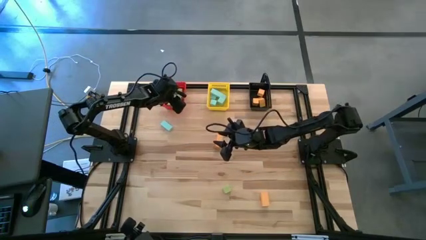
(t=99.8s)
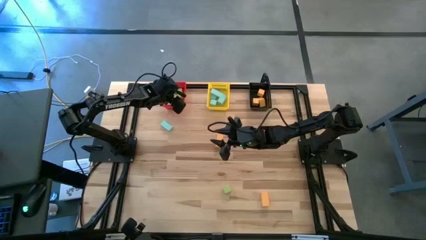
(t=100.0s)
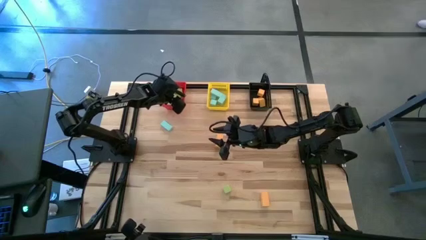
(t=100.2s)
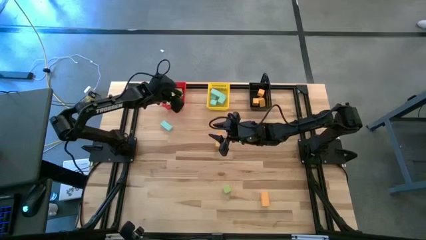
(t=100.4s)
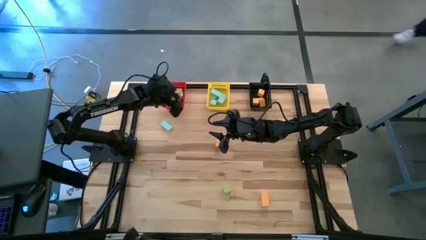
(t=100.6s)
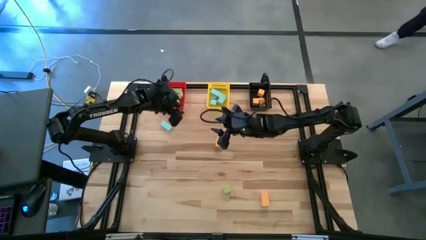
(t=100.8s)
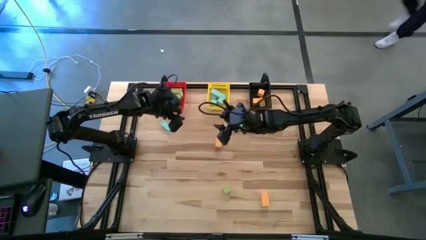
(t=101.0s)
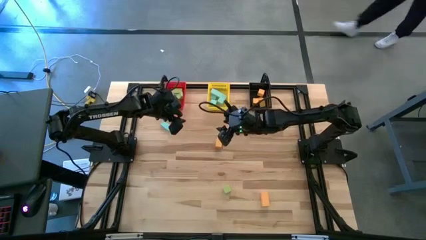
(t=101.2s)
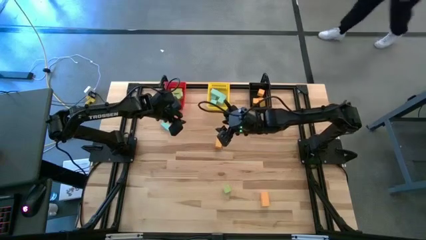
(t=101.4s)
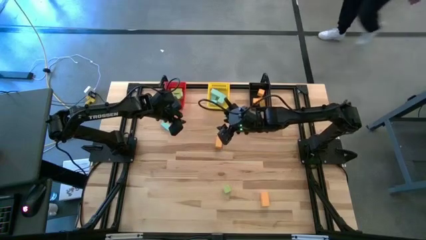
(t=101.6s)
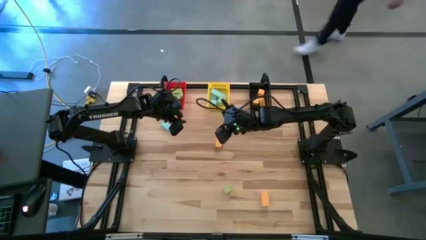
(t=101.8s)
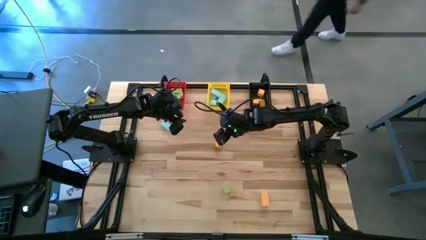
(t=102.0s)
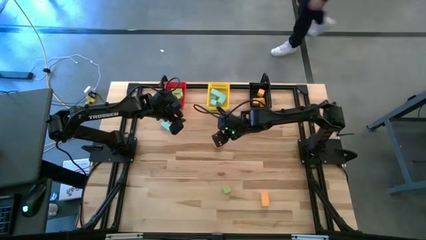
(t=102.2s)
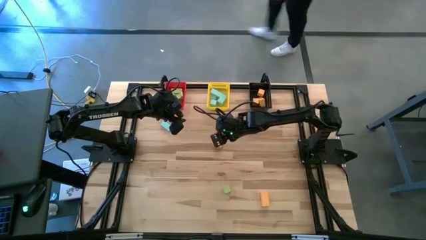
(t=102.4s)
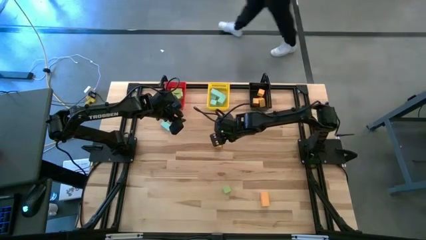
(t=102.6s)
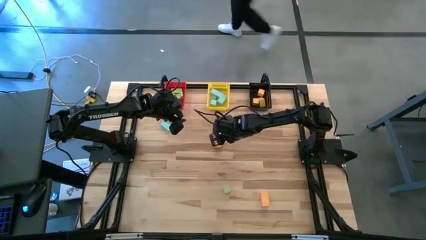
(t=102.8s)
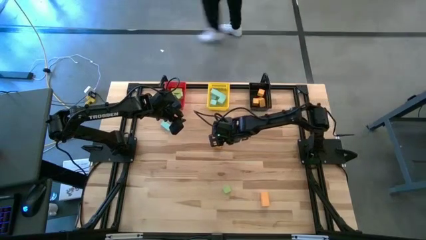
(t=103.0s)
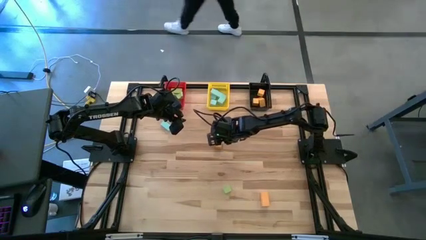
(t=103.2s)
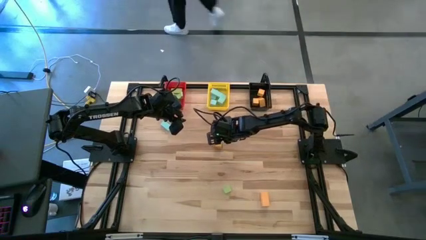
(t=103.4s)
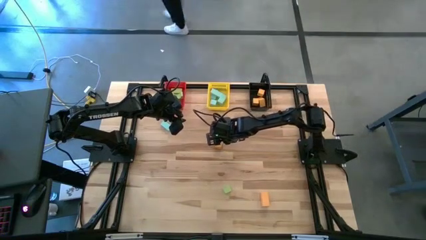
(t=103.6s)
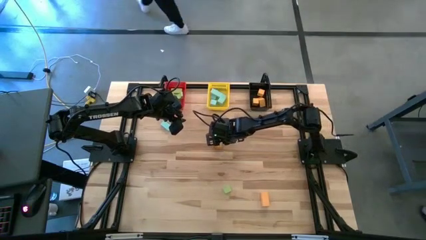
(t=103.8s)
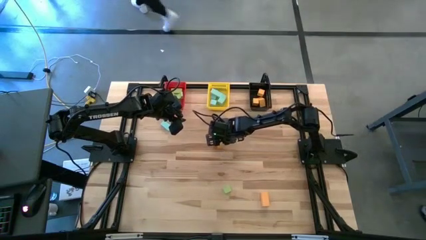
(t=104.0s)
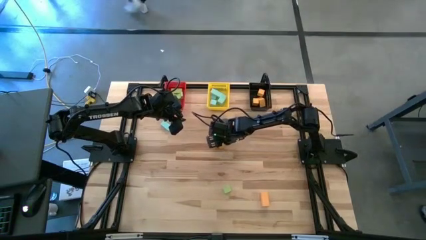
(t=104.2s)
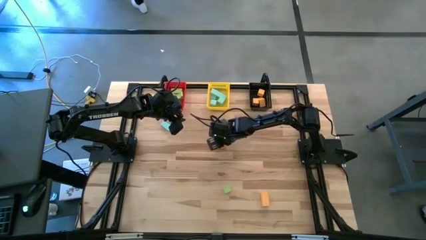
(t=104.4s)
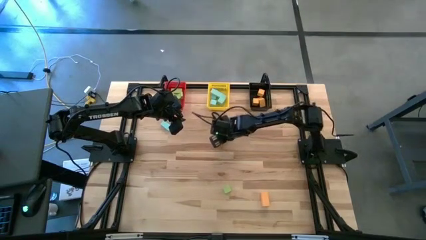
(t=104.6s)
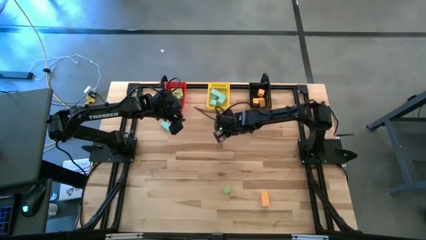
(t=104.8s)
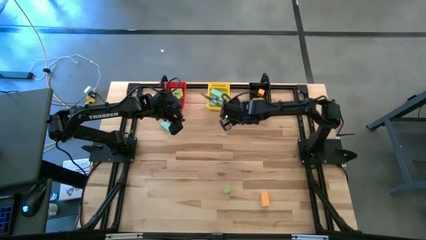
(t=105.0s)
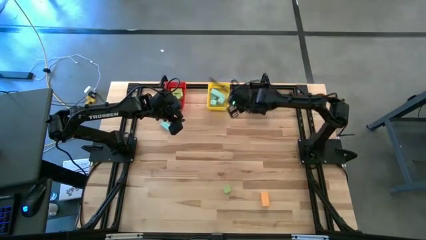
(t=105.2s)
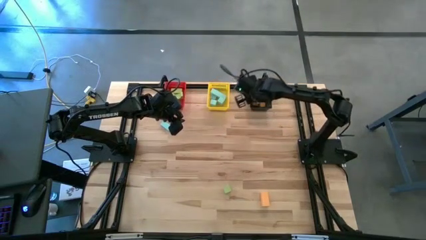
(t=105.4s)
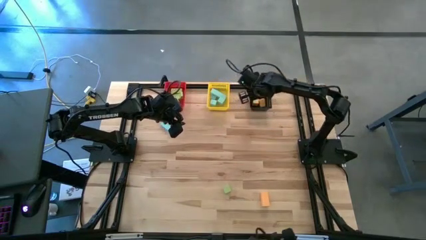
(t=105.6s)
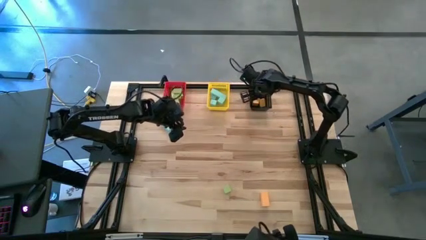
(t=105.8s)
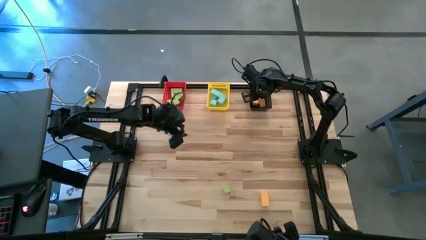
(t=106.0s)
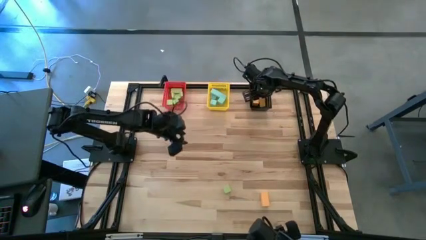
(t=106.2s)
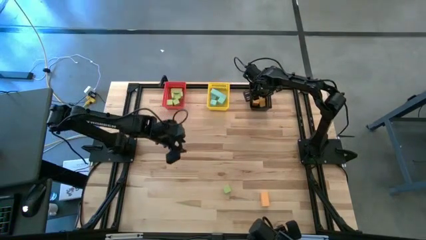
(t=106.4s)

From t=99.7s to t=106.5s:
Task: Sort & place blocks by color
Put the yellow block into the black bin

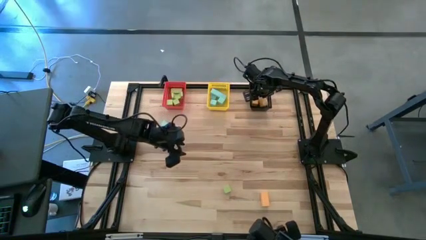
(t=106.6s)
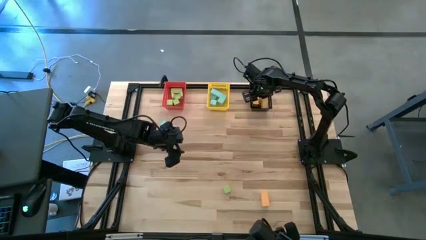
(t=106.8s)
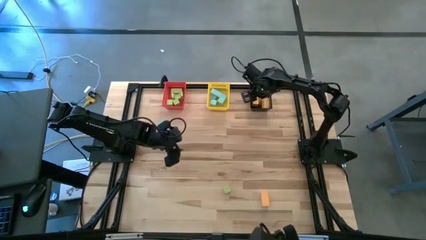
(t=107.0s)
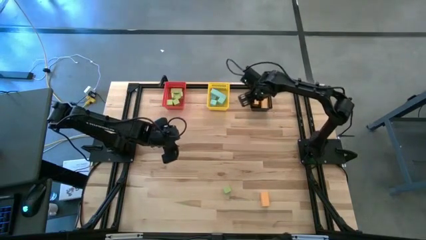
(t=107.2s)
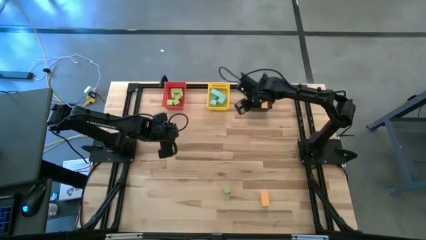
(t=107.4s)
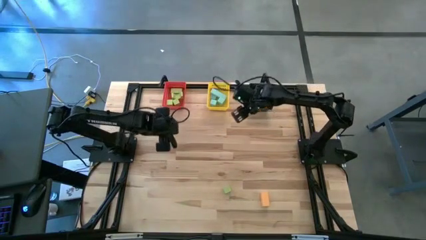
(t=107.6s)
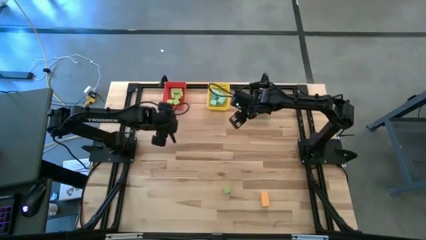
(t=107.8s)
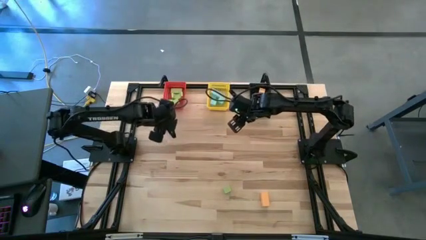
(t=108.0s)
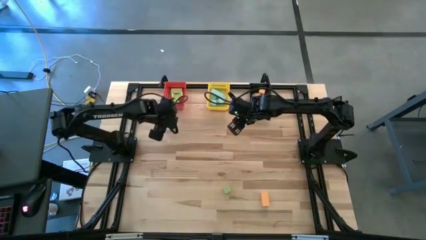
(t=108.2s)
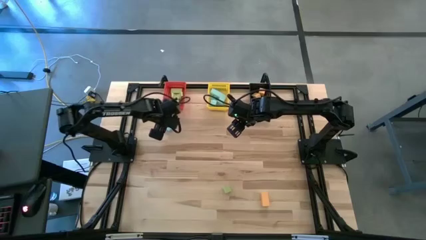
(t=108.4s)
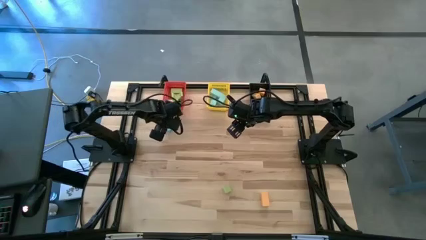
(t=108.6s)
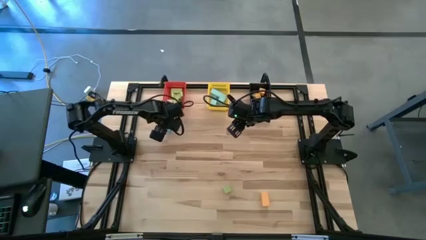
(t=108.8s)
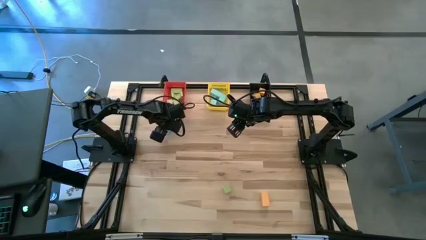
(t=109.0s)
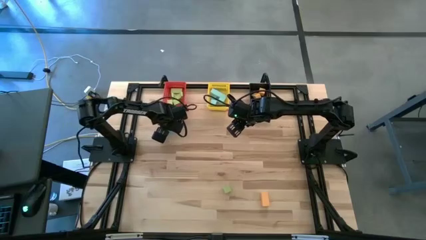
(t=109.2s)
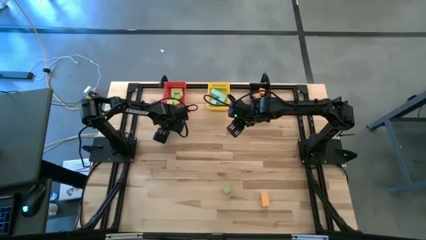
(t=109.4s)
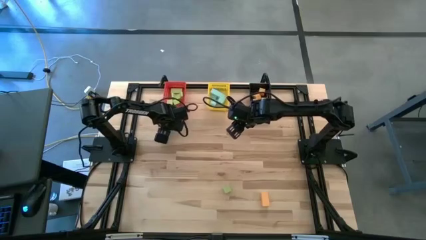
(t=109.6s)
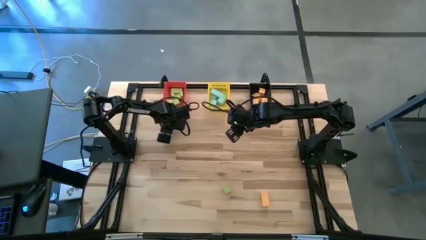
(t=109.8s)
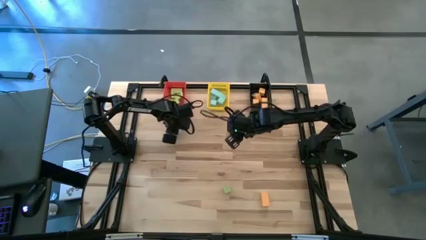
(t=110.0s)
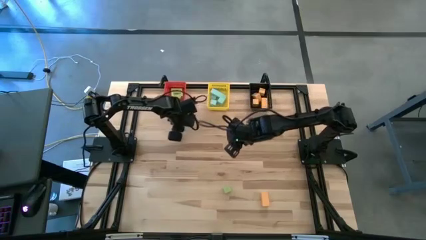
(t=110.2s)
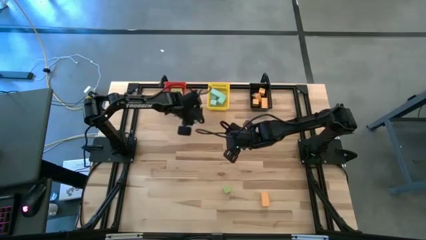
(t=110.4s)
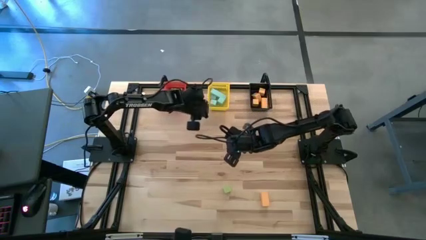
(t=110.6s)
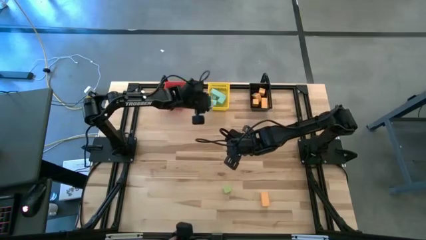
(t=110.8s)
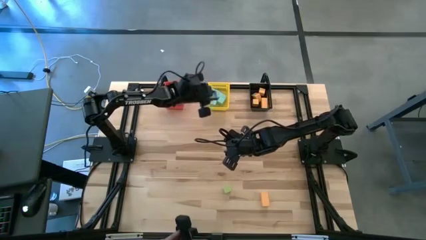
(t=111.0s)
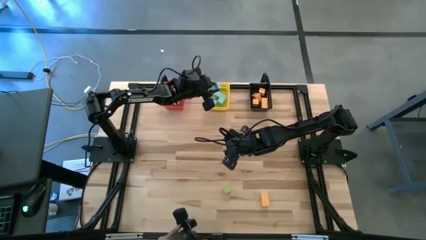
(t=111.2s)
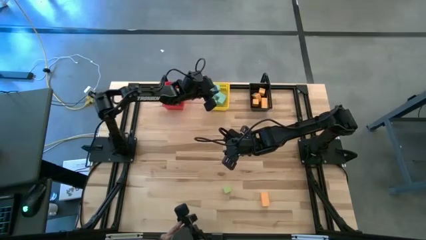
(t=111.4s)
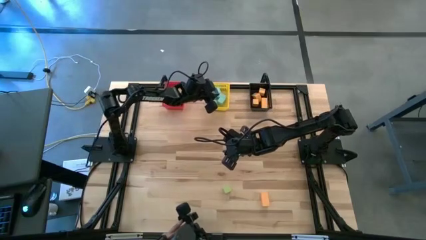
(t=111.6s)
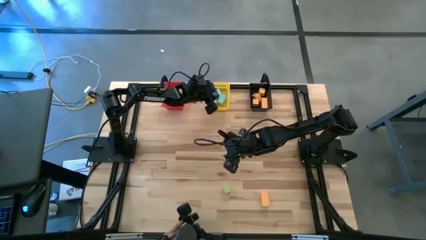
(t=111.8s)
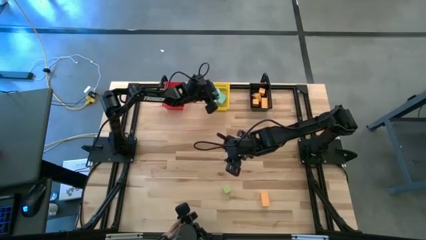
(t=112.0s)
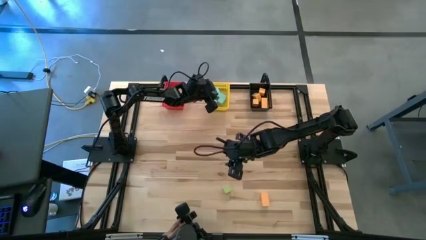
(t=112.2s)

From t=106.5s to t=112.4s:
Put the blue block into the yellow bin

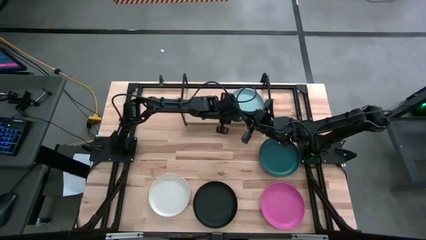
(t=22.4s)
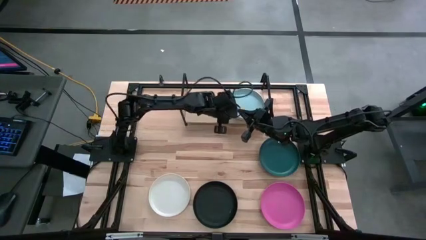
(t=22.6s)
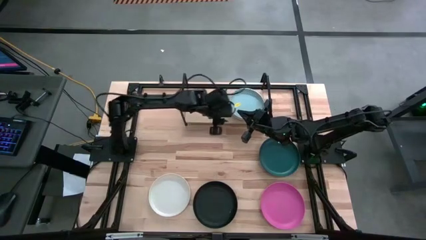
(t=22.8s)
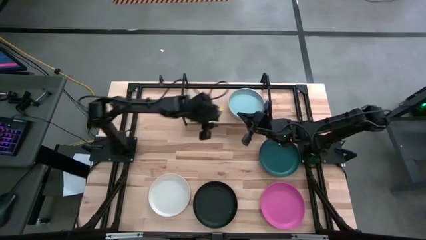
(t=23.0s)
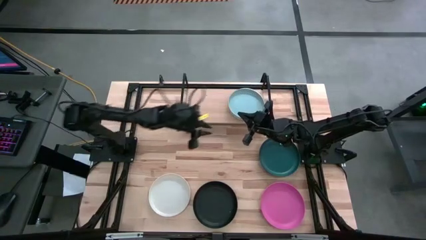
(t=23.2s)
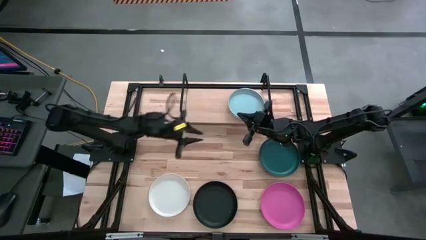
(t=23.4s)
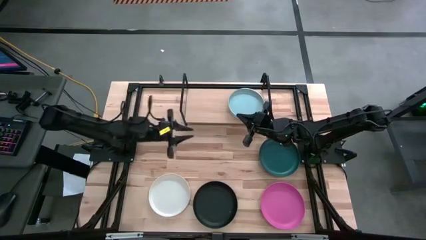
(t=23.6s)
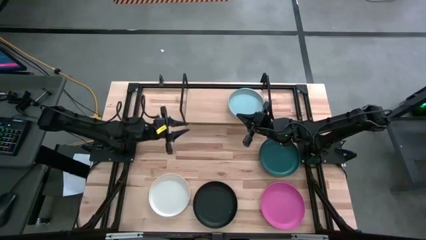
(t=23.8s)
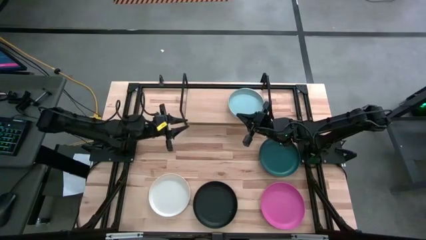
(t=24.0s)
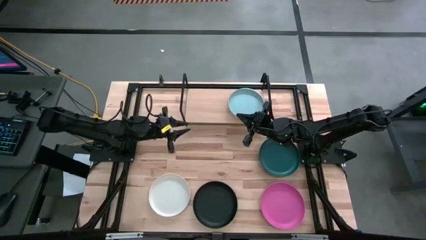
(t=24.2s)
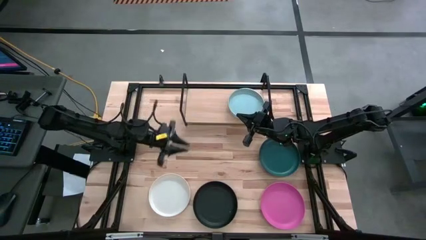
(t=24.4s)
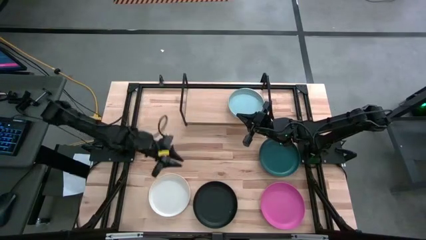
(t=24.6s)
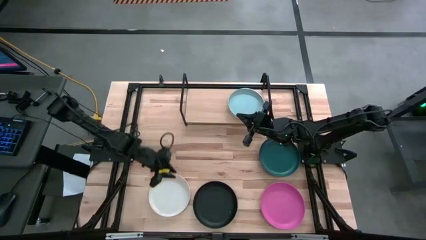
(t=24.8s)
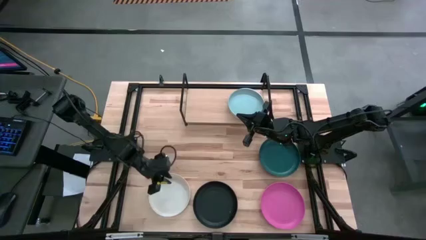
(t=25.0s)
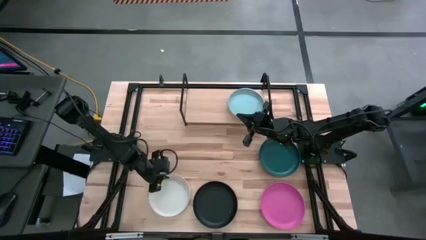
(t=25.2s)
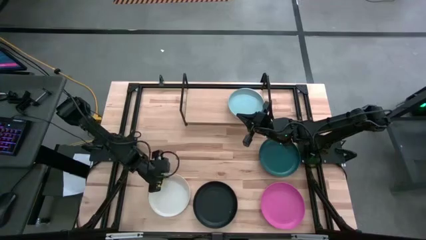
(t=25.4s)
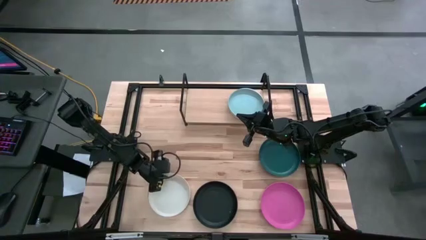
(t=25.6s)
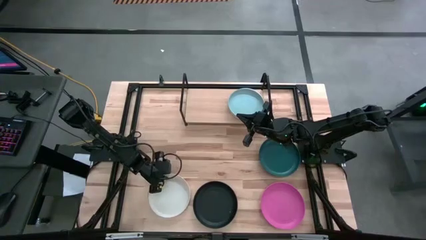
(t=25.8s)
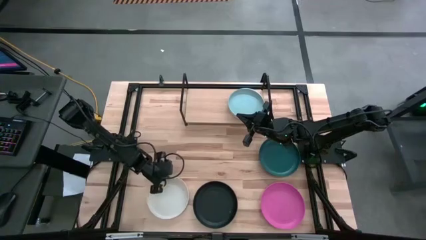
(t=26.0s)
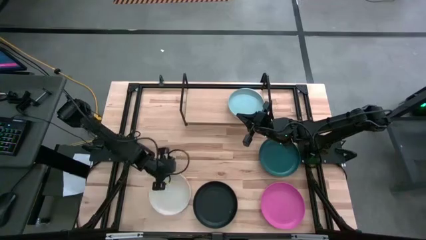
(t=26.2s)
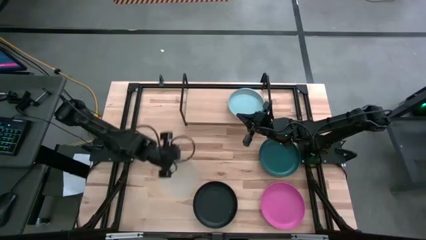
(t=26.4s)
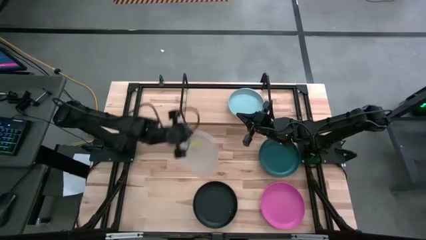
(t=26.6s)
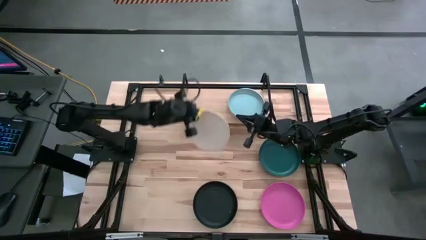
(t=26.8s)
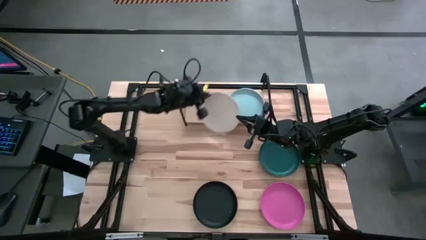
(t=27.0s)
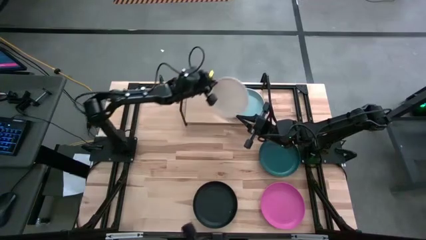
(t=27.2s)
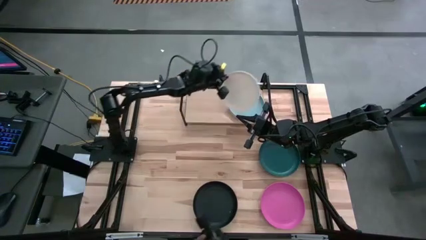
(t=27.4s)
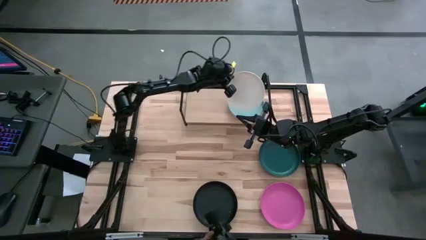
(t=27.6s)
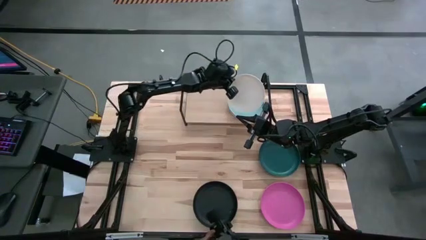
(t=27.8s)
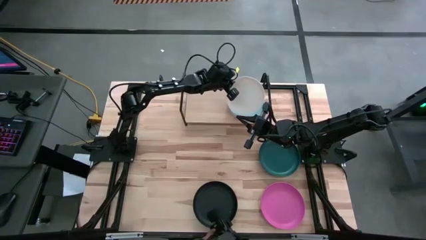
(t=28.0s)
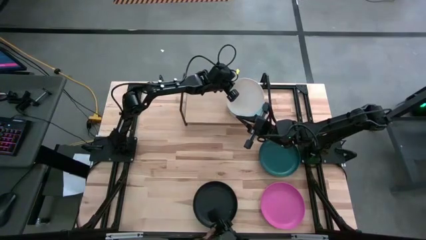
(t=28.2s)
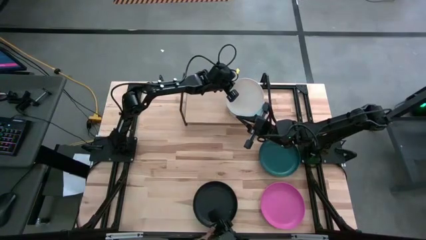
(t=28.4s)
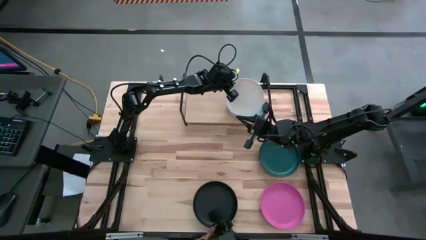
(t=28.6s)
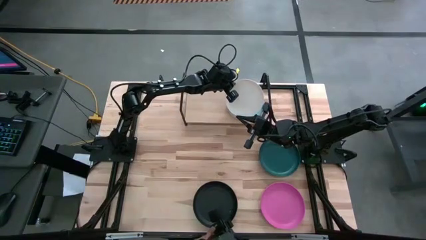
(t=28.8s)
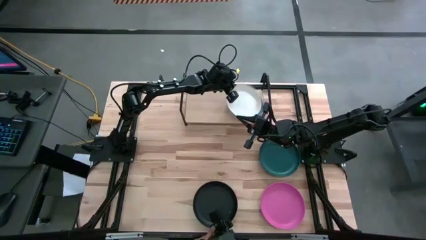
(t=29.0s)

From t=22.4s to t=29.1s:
Task: Place and stack plates onto a shelf
Stack the white plate on top of the light blue plate on the shelf
